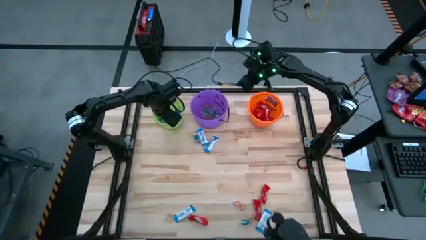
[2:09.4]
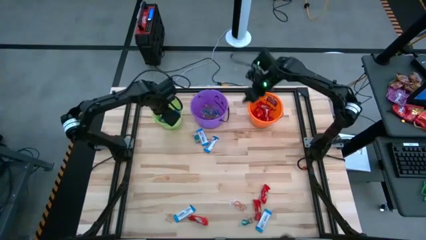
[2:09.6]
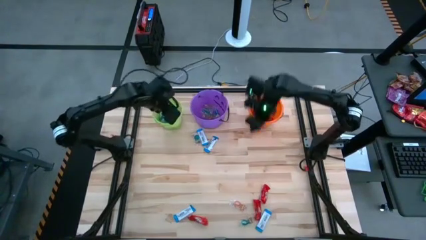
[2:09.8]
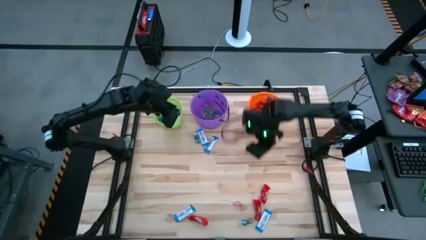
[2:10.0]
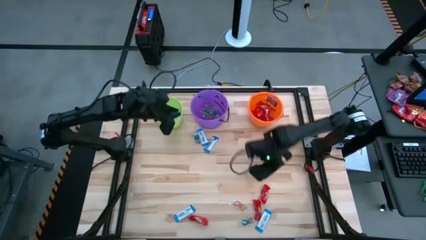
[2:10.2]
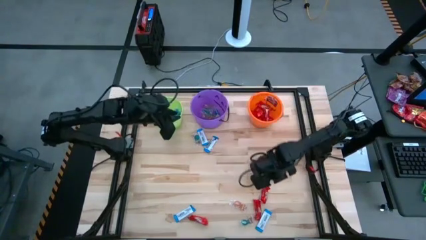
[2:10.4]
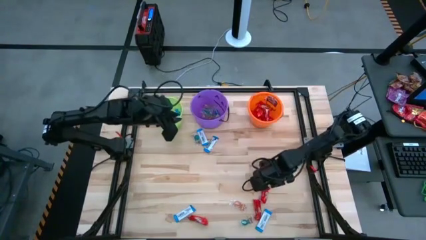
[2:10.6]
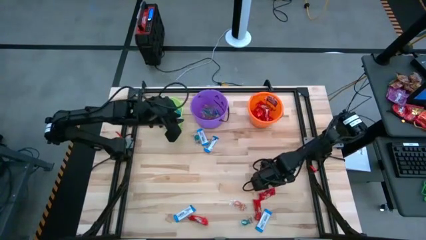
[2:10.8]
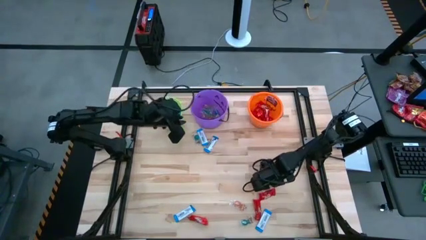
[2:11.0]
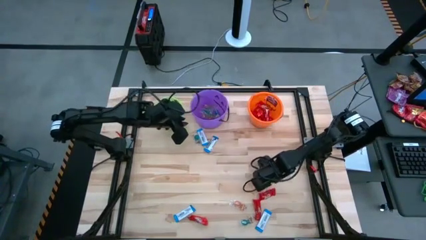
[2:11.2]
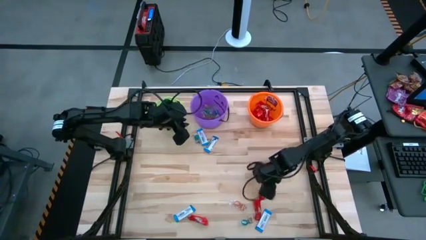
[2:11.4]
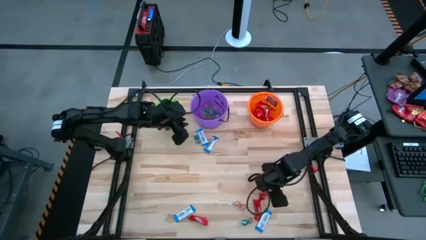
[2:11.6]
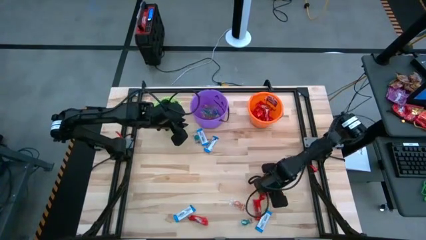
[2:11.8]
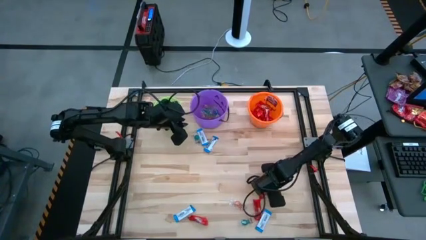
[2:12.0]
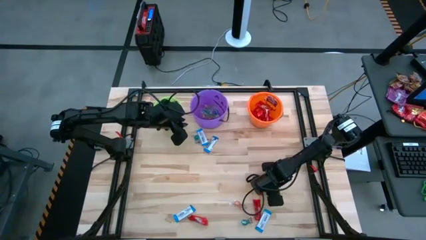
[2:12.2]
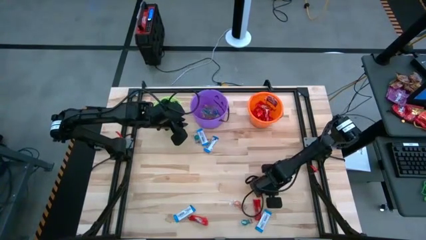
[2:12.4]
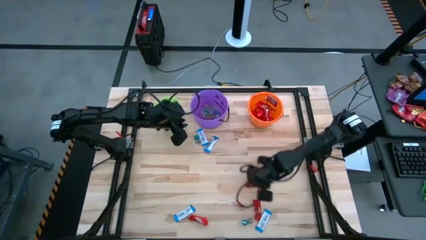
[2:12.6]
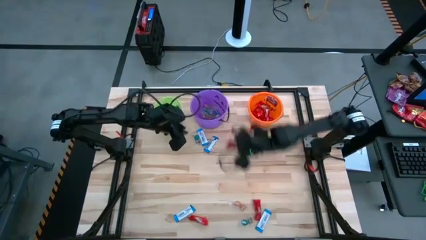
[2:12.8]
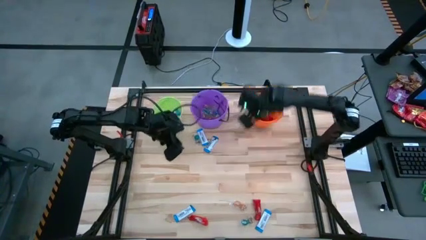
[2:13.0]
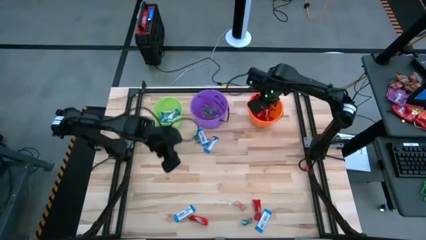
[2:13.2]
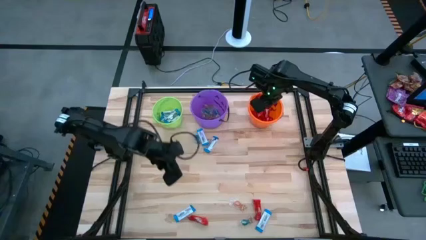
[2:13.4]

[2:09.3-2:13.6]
Task: Sort candy by brand, put in halloween buckets
Put the red chocolate into the orange bucket

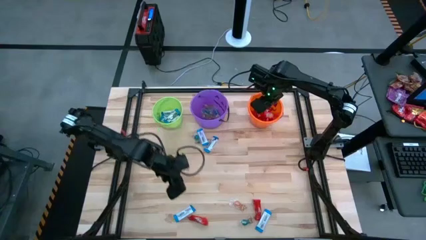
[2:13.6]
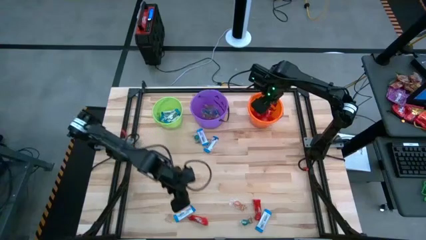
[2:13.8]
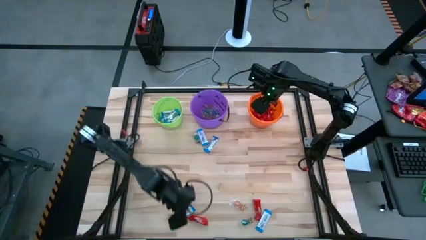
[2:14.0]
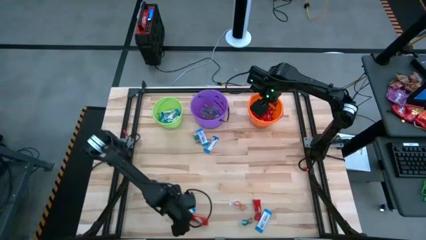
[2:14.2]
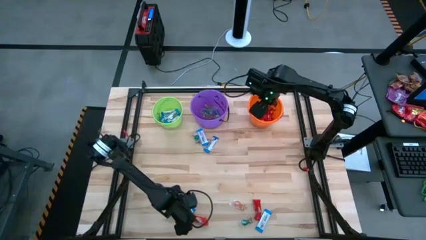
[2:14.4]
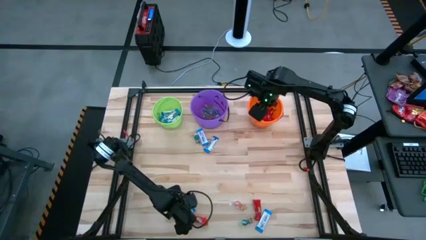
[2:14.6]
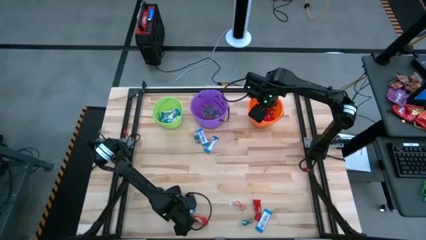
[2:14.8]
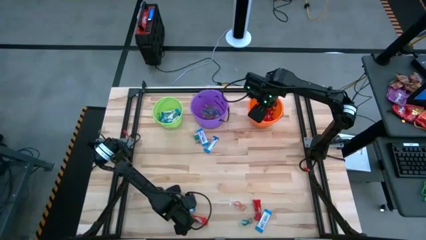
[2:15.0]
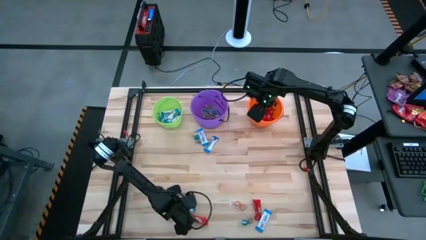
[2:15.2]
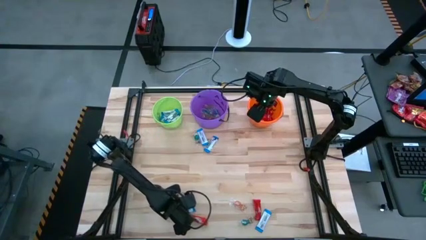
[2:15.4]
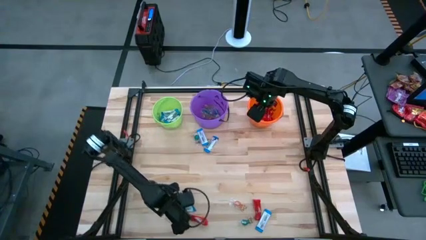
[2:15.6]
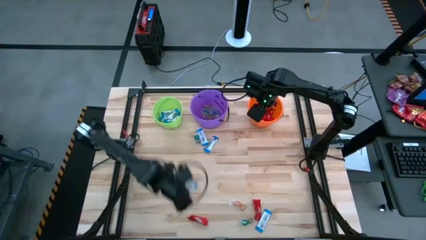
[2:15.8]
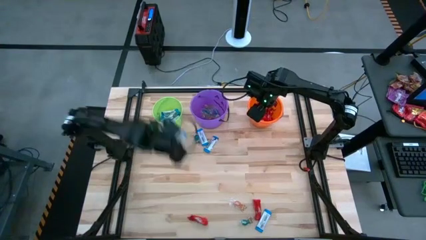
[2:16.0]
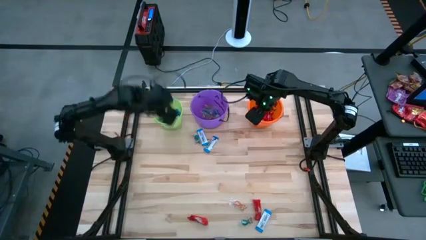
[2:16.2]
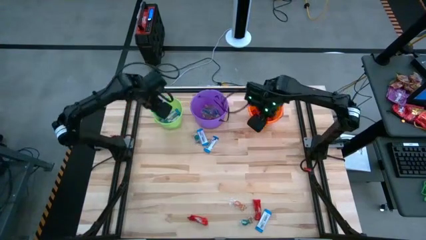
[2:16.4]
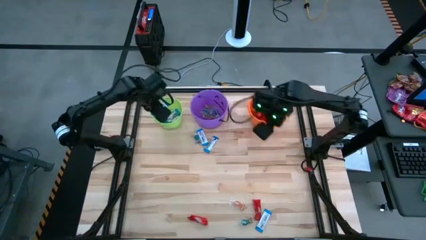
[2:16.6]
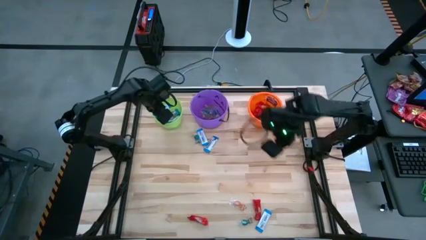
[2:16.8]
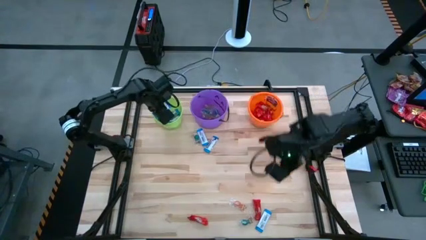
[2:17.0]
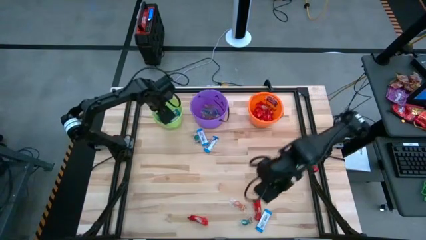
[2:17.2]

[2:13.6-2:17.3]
Put the white chocolate into the green bucket

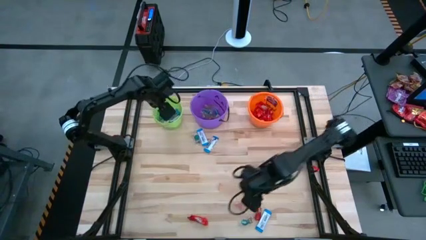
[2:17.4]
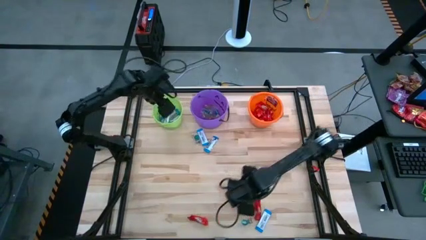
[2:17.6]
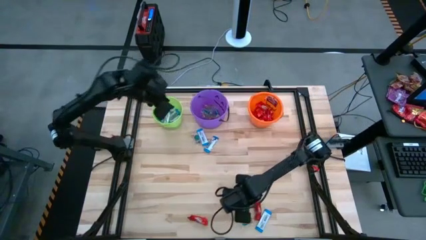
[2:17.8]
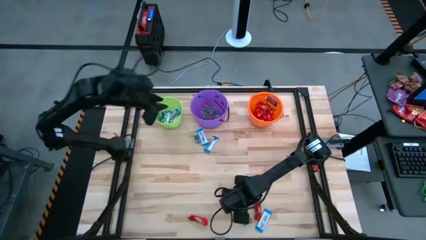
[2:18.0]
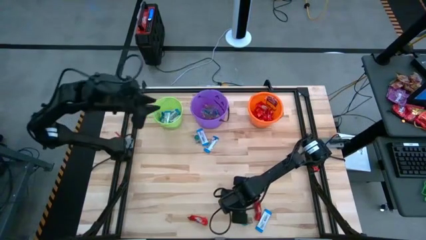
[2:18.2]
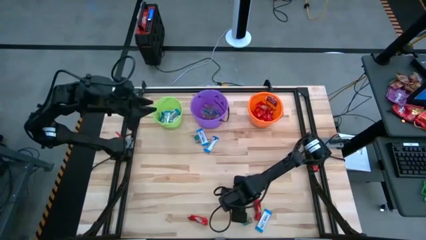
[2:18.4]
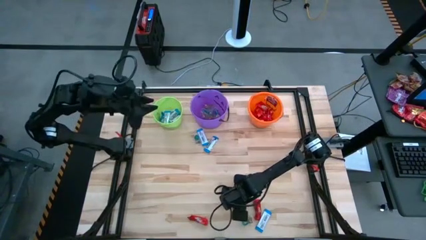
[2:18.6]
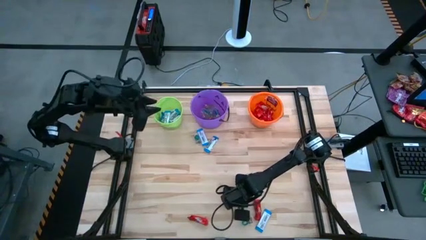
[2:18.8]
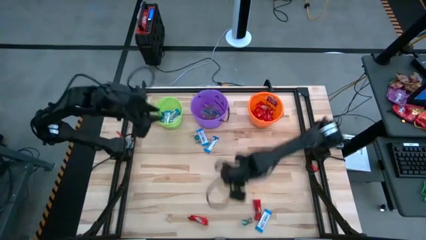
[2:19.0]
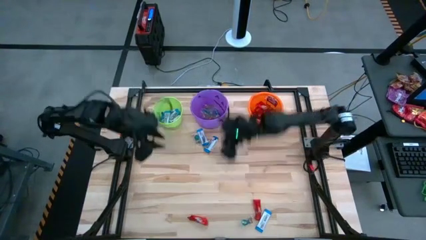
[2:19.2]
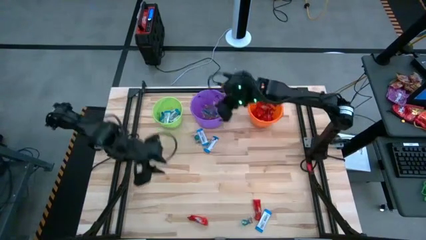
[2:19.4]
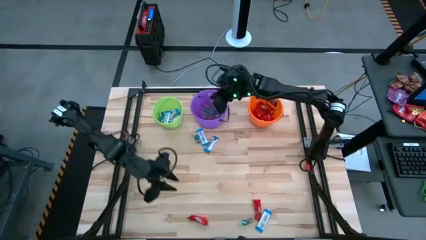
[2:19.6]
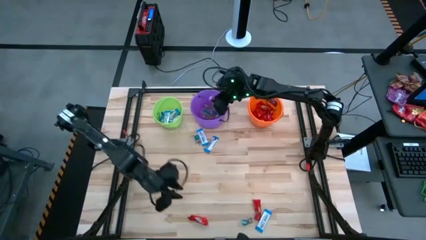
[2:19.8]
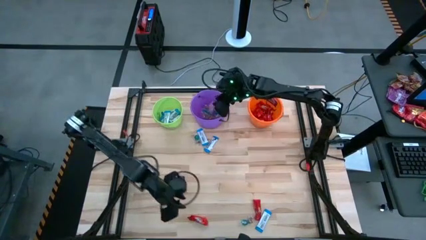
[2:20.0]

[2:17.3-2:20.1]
Put the orange gummy into the purple bucket

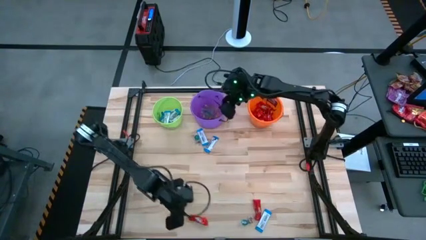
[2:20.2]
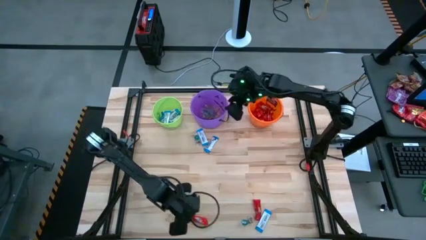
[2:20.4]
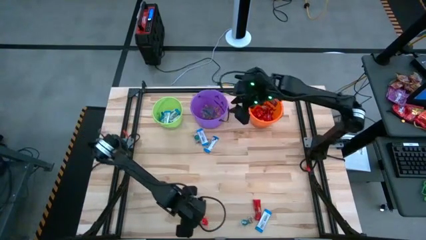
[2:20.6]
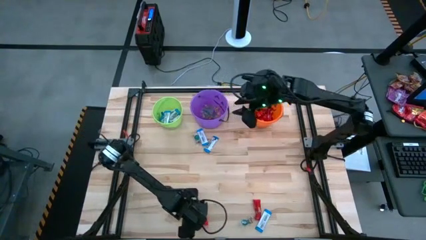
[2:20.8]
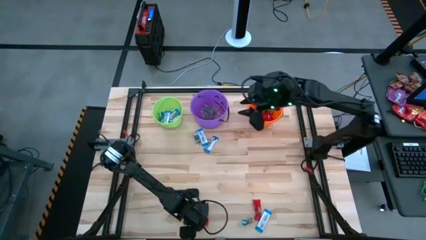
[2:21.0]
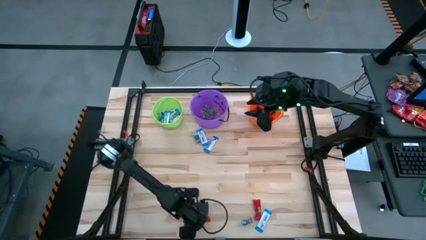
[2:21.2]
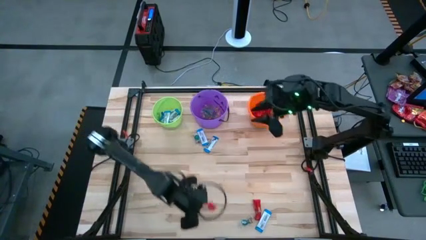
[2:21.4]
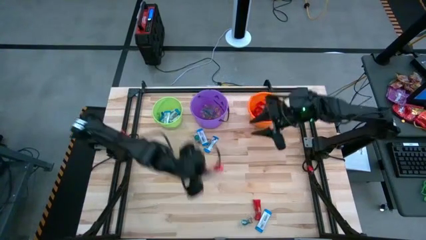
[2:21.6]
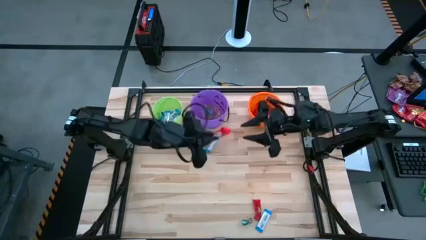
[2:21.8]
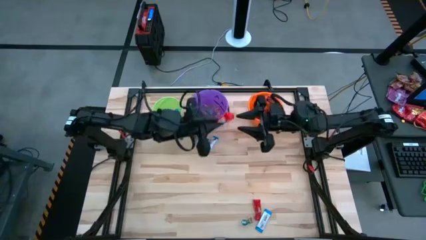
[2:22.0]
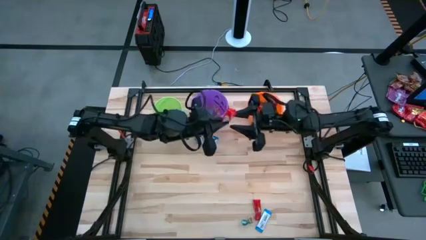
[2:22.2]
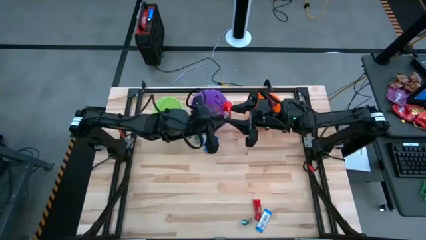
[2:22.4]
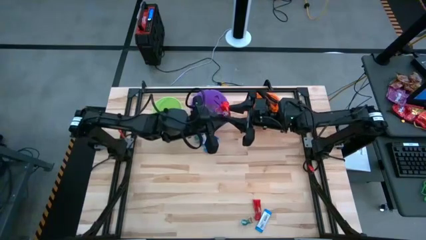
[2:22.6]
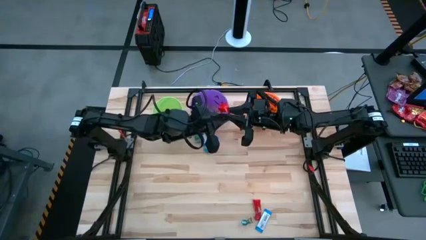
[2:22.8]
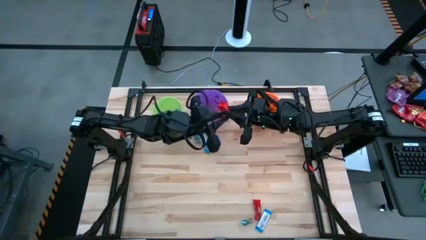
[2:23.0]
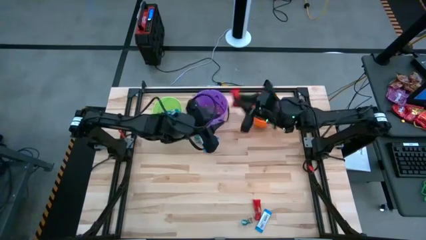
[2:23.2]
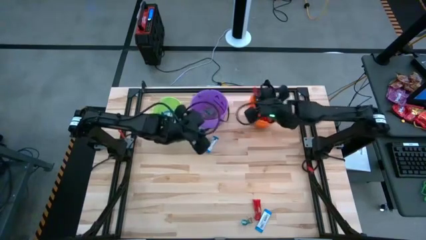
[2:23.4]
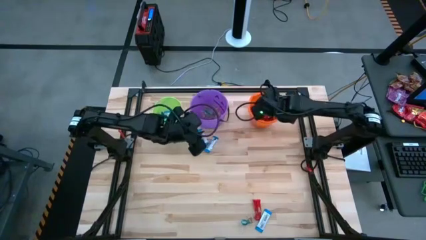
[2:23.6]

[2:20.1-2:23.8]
Put the red chocolate into the orange bucket

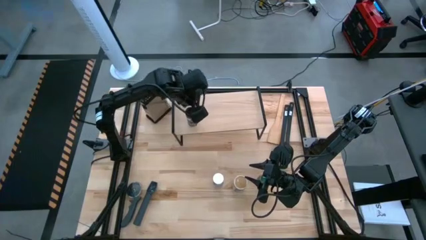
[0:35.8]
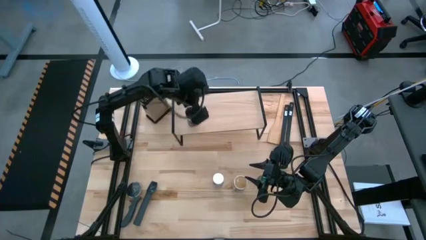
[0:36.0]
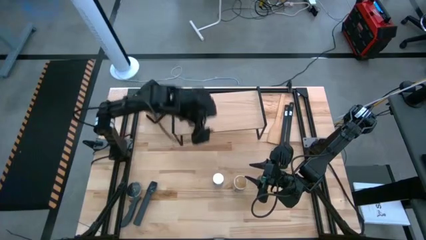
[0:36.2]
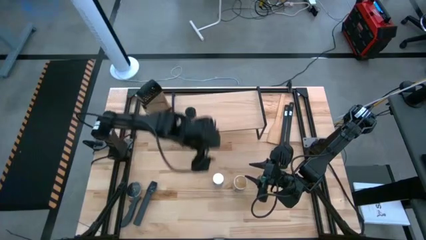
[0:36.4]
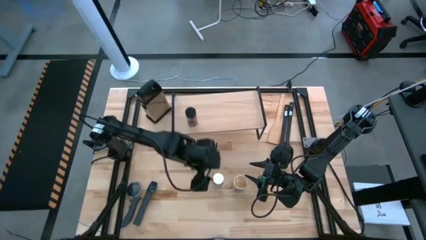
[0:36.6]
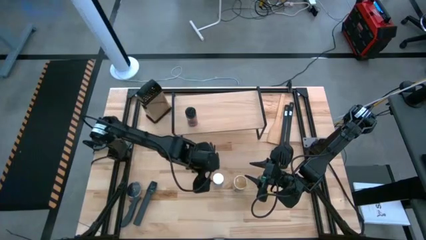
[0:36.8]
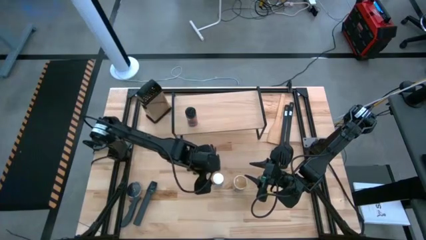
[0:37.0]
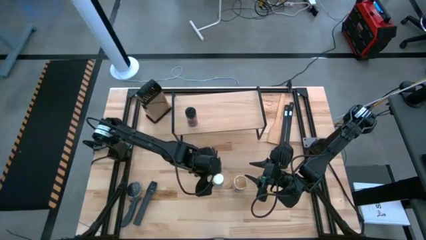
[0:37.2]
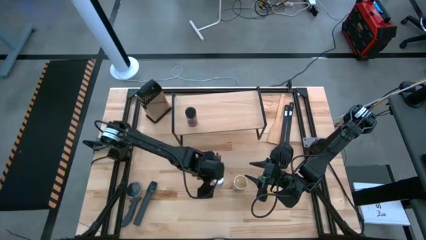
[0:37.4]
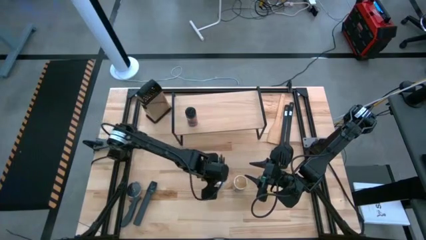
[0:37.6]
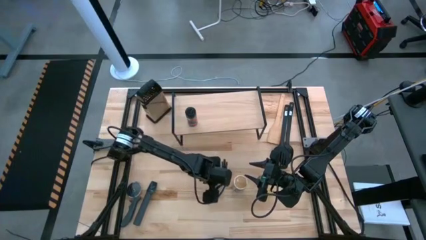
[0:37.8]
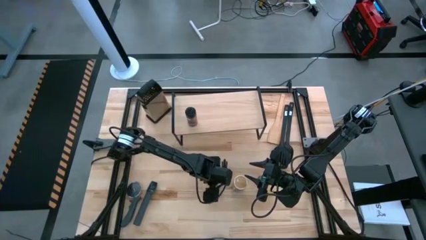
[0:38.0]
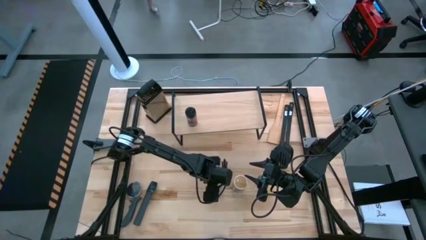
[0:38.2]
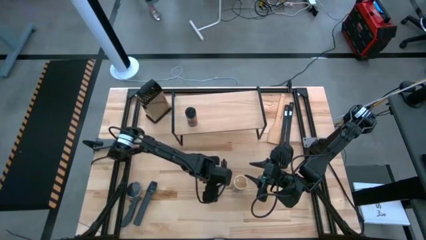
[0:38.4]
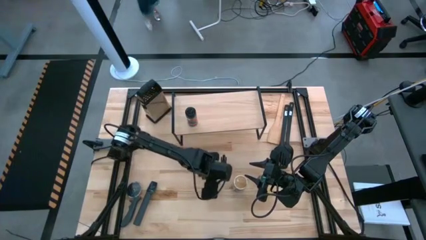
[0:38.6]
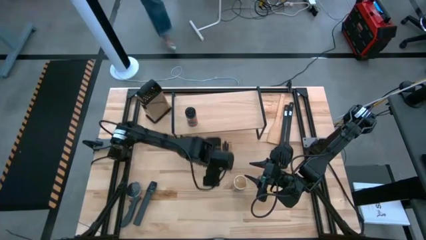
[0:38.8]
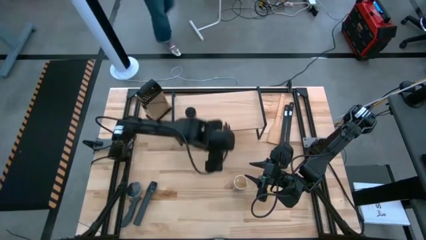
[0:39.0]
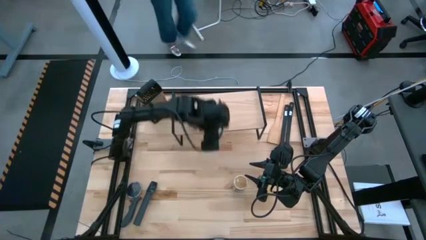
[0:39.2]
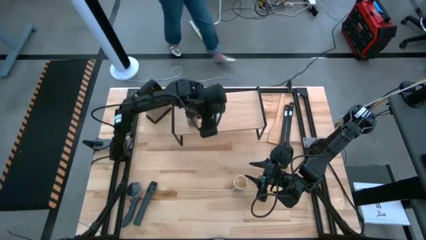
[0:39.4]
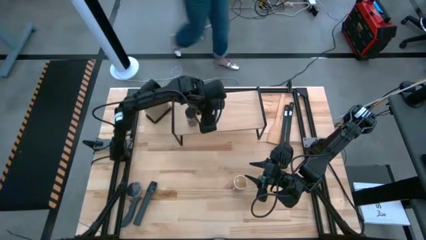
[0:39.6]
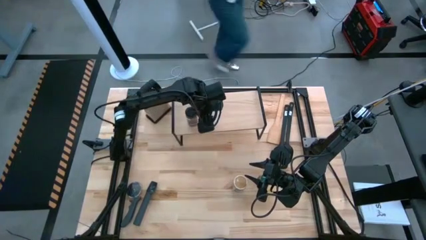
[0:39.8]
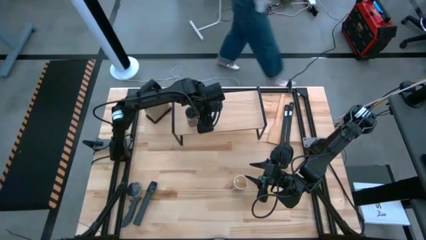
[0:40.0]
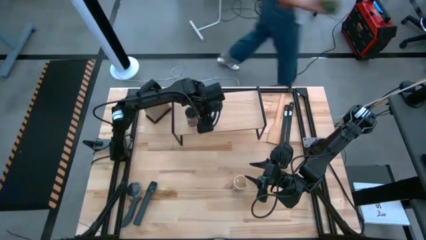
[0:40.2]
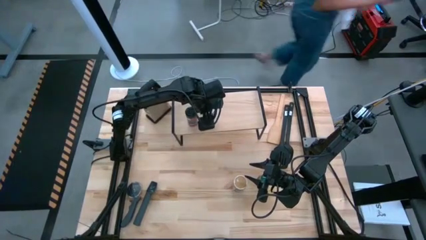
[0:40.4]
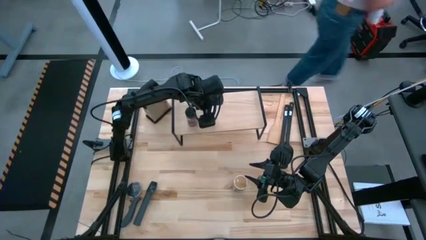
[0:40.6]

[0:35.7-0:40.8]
Task: Shelf spices
Put the white seasoning bottle on the shelf aligned with the other black seasoning bottle
